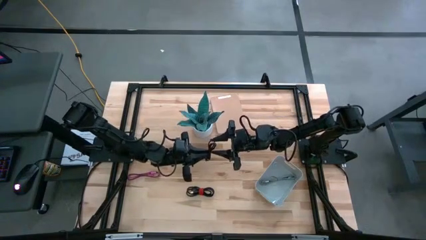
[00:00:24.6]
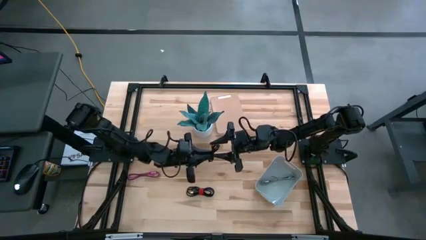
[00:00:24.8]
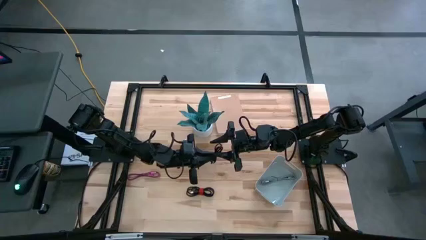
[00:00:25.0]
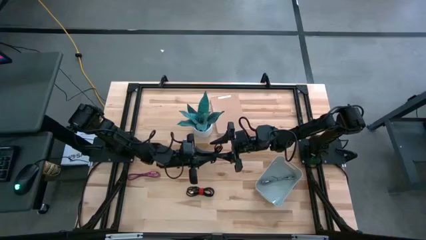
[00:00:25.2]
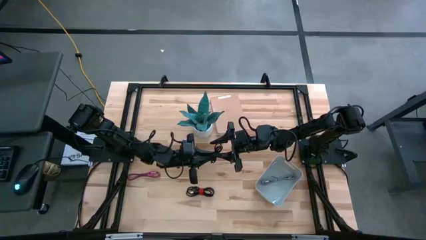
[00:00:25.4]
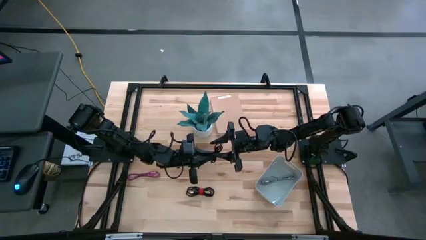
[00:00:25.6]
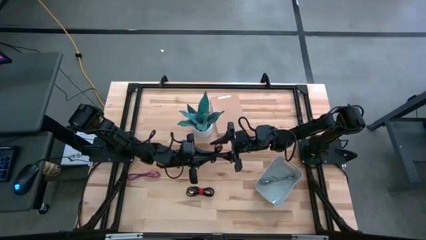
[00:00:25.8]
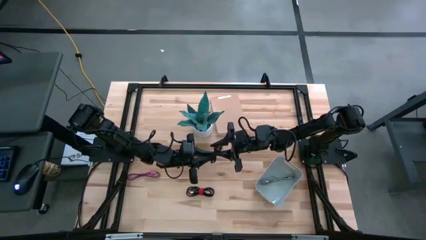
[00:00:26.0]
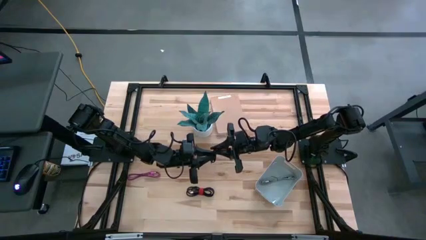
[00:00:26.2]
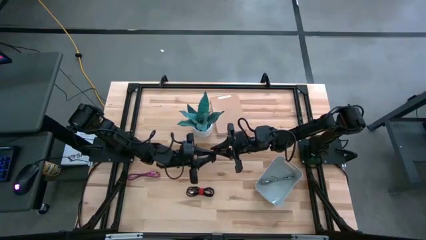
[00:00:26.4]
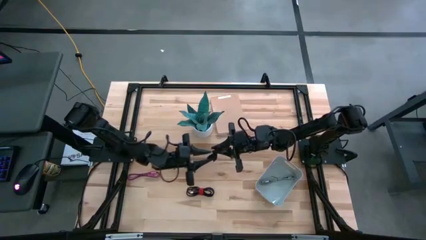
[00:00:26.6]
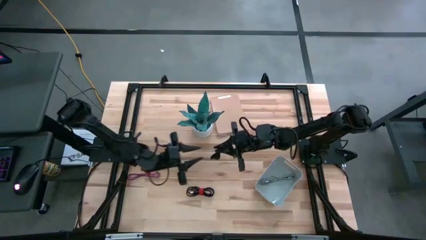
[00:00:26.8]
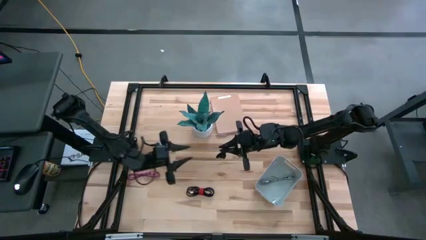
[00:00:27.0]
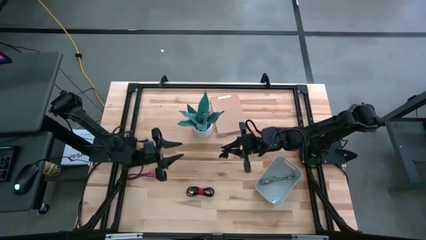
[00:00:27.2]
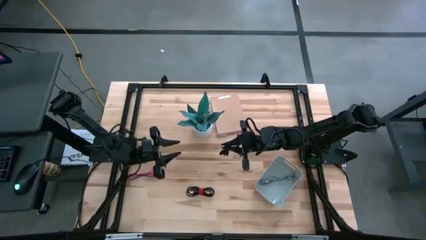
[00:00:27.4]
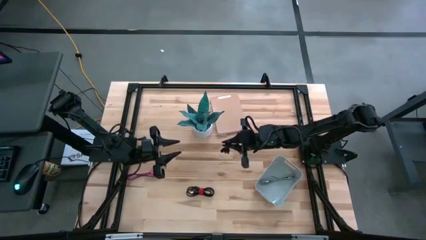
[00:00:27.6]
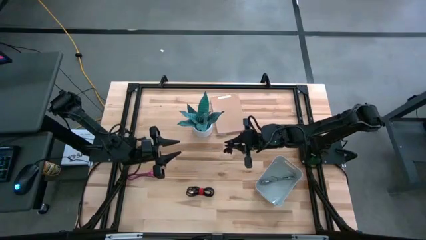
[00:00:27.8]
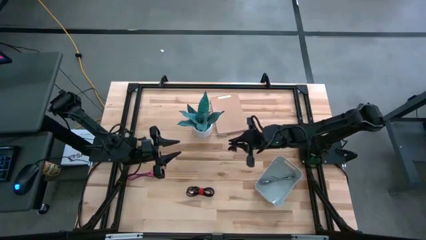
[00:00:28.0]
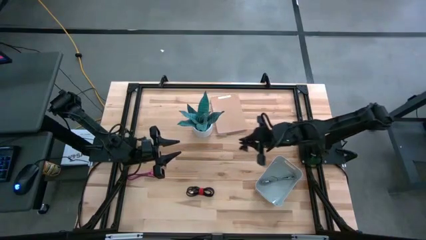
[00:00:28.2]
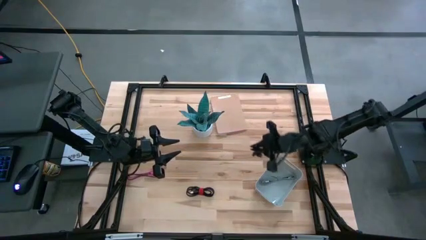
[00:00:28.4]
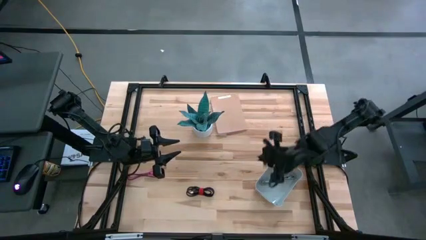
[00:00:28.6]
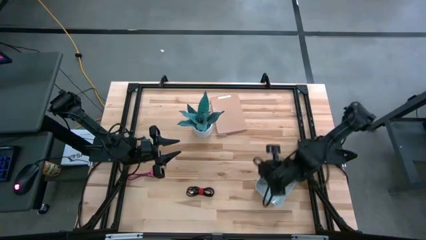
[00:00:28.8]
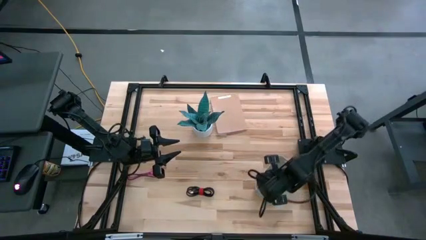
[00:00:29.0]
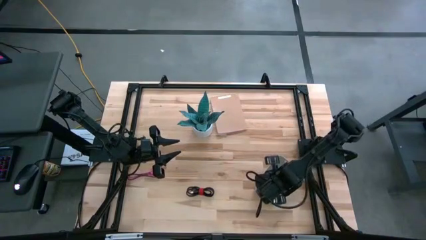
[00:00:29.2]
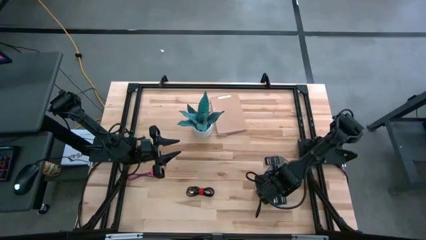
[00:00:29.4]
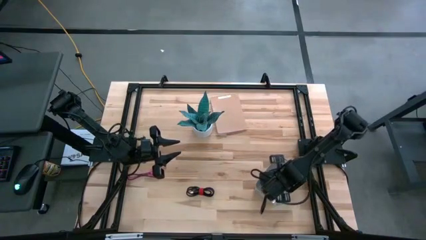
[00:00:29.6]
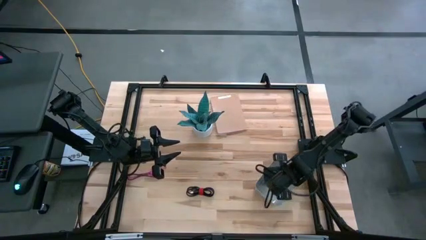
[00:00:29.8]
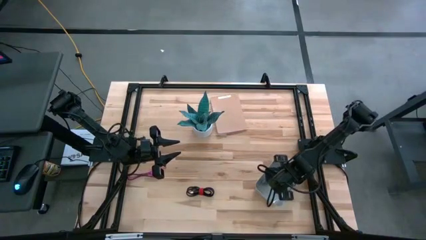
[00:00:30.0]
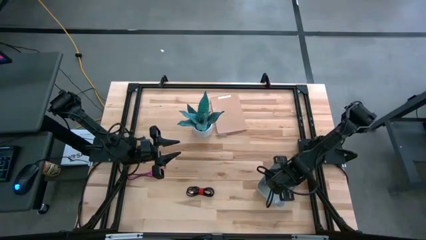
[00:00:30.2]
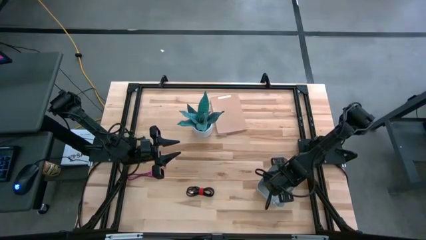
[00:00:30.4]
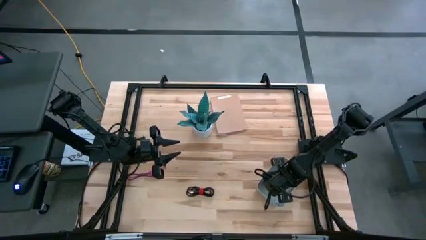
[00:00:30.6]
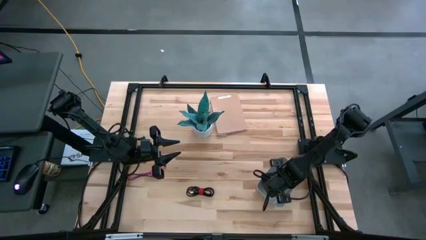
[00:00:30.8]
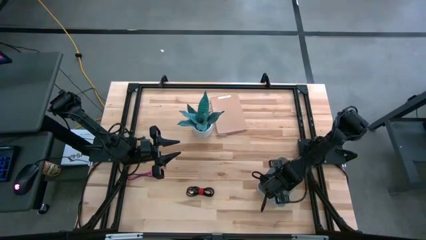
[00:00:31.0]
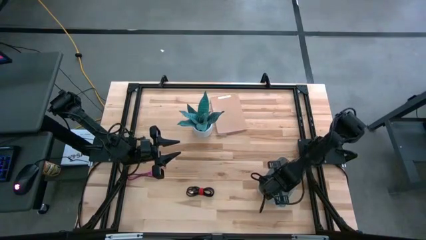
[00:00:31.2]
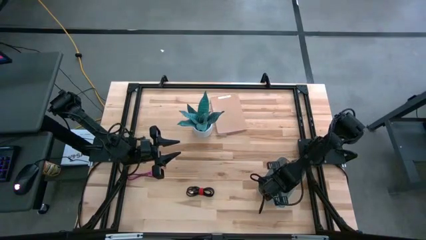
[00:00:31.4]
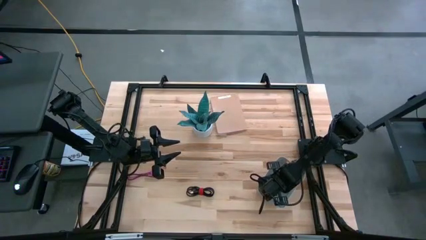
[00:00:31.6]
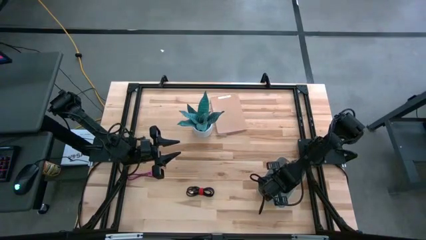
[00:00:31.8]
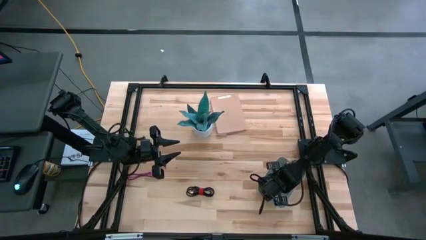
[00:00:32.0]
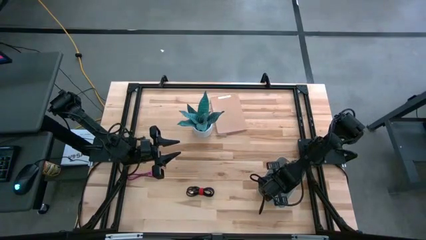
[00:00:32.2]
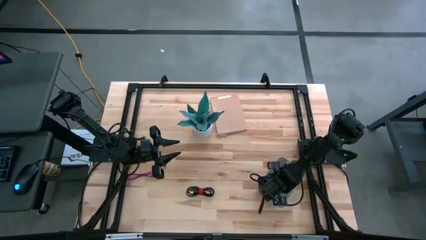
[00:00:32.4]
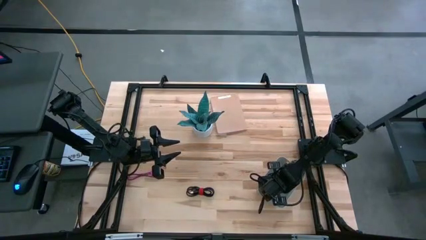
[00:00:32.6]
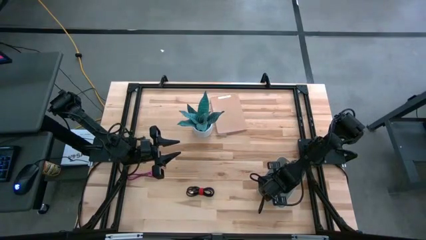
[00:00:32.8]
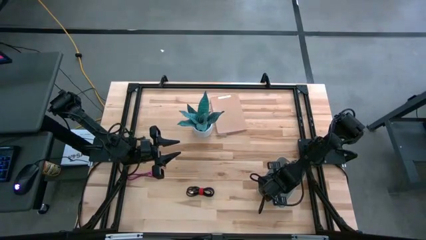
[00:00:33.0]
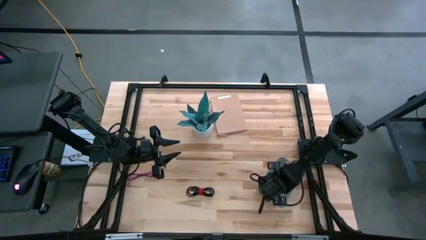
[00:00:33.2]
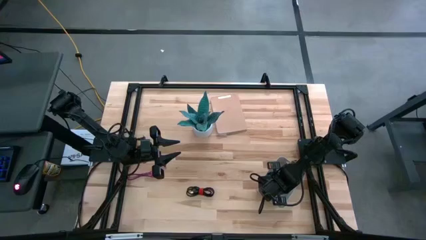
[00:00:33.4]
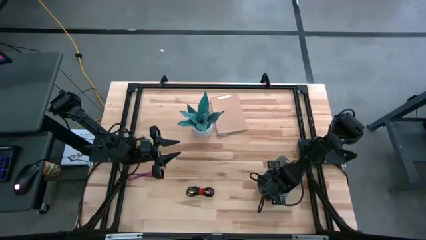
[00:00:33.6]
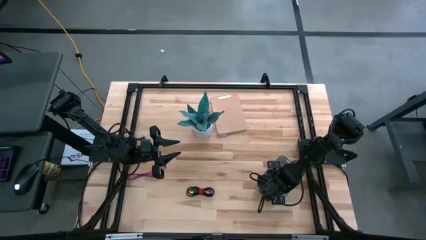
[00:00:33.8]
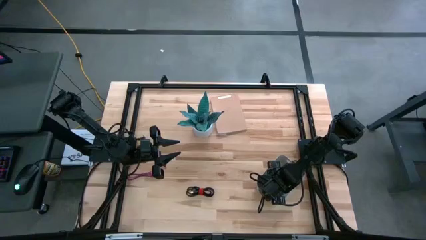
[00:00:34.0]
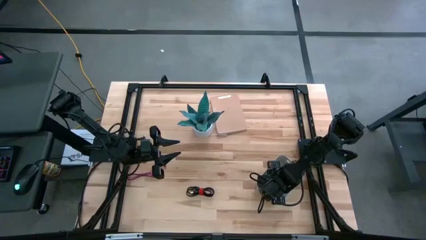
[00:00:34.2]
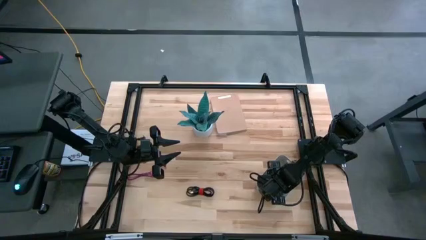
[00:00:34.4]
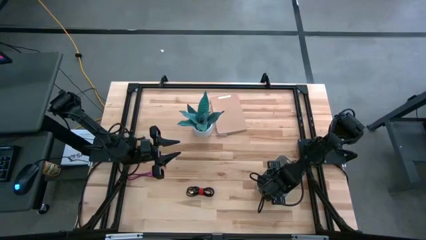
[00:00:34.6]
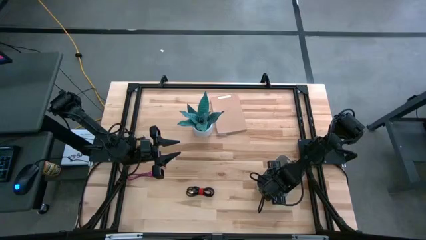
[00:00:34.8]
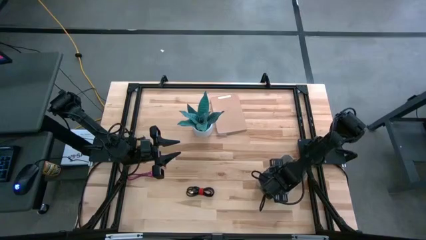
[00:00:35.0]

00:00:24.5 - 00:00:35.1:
Task: Pick and place USB-C Cables
Put the top black charger cable into the white bin

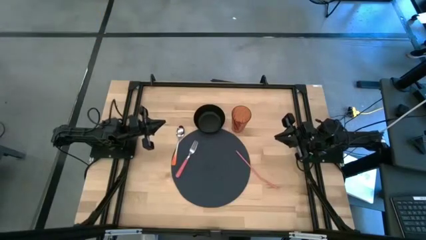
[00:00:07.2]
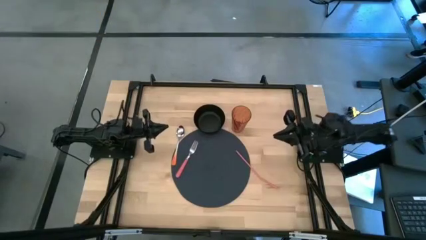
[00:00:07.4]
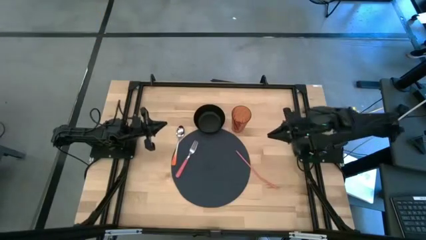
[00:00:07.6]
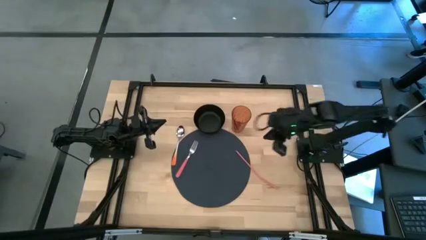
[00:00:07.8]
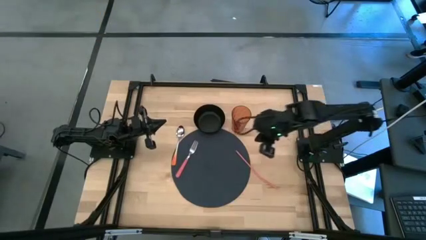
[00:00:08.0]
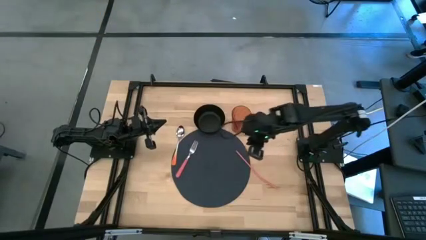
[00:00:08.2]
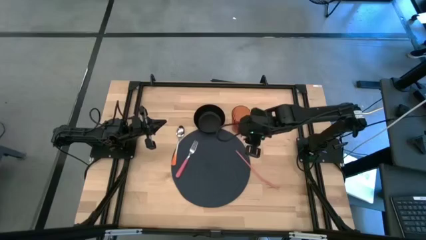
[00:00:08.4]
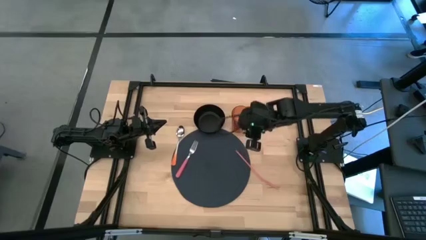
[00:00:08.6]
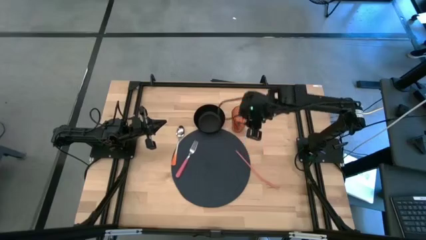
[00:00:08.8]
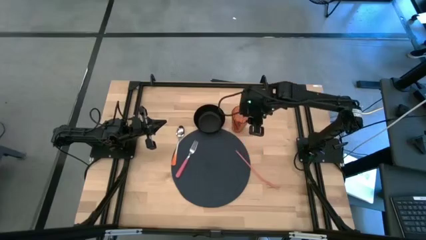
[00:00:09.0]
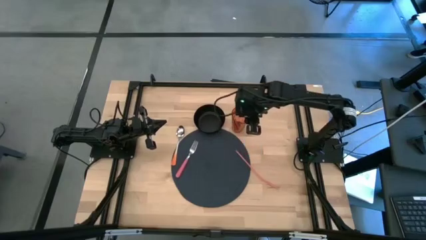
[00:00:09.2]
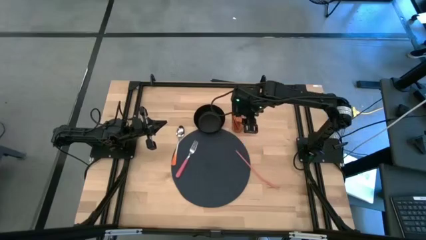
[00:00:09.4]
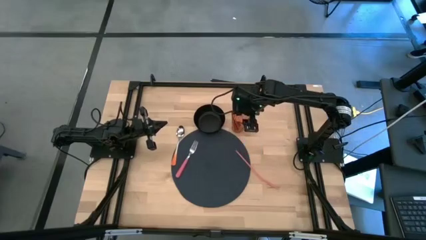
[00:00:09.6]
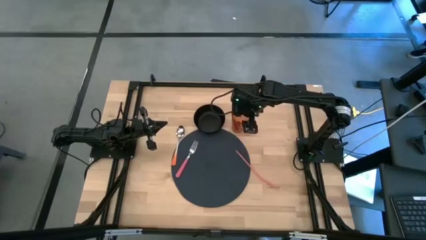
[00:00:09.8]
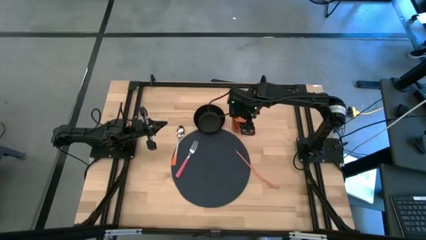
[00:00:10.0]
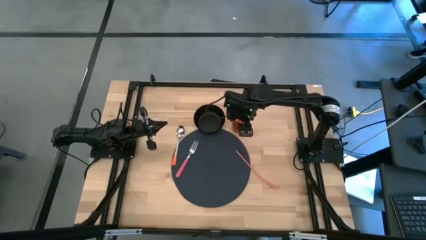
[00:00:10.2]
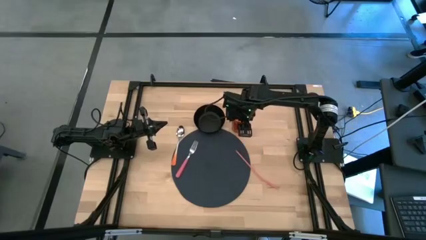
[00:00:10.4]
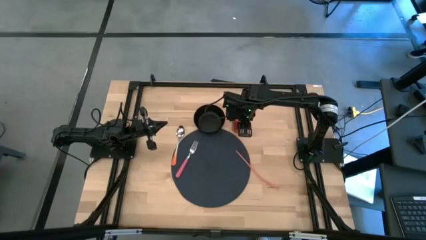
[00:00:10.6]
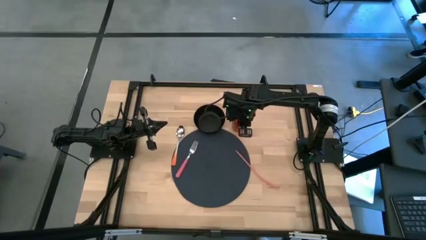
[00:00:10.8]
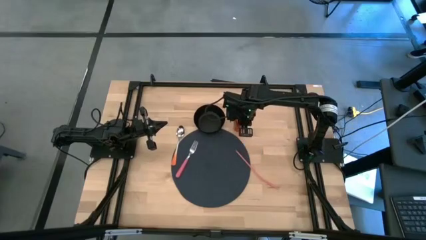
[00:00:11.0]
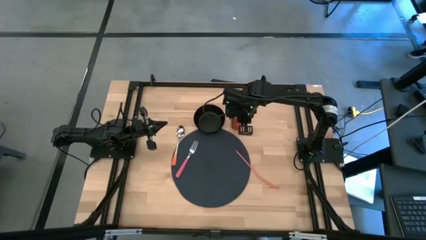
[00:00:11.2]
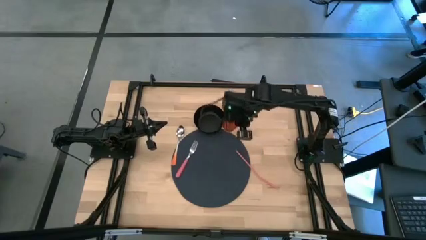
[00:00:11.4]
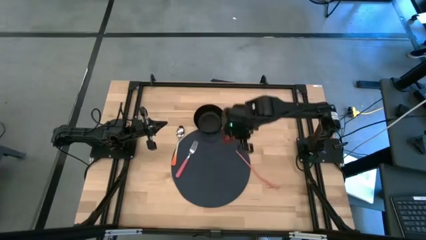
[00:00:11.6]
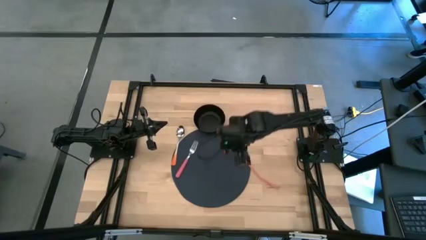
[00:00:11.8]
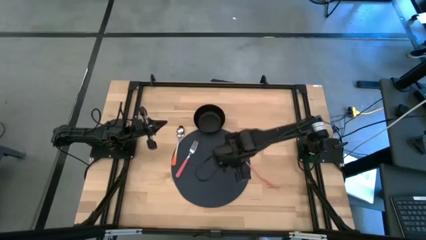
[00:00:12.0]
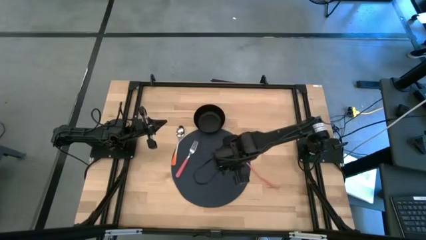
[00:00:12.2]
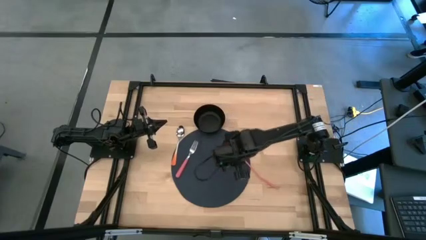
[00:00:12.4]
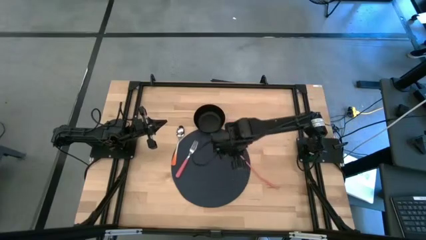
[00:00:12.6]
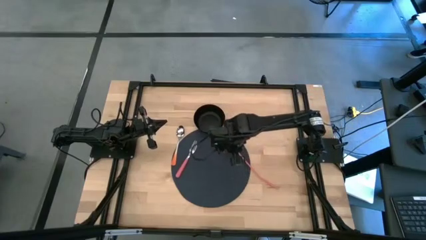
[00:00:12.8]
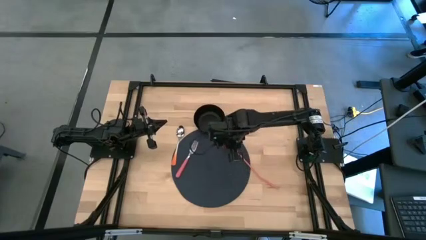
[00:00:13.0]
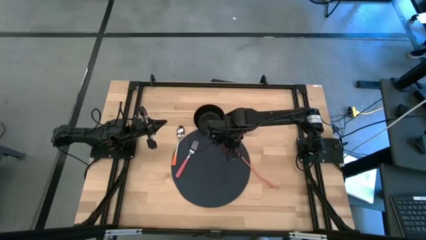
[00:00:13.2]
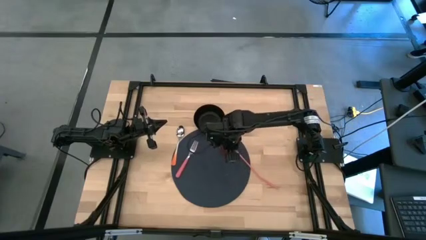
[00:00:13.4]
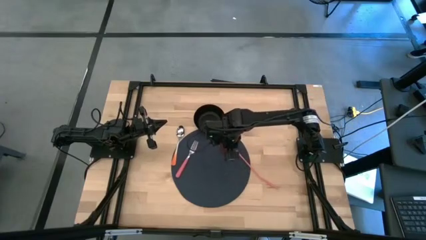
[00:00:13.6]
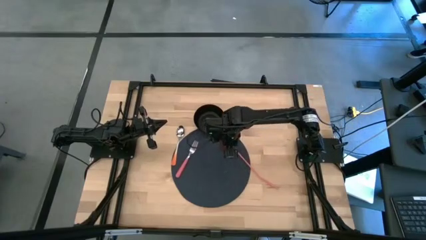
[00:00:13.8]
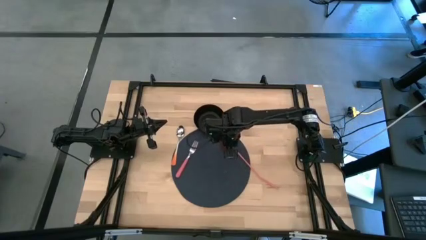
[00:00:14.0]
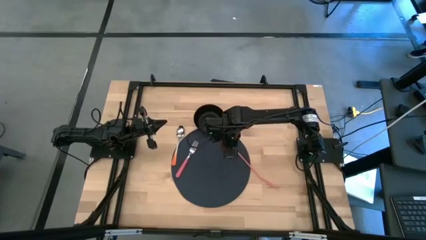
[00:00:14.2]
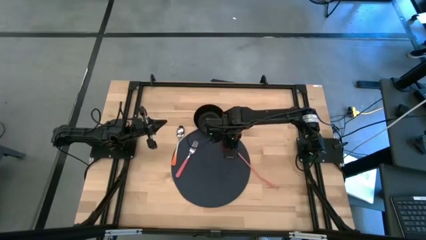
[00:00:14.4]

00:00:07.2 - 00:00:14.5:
Task: Pick & Place Utensil
Put the brown cup on the black mat
